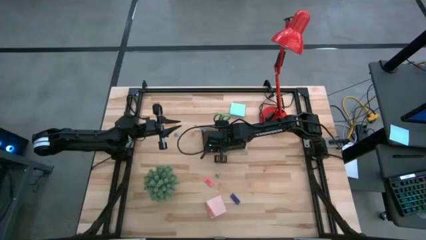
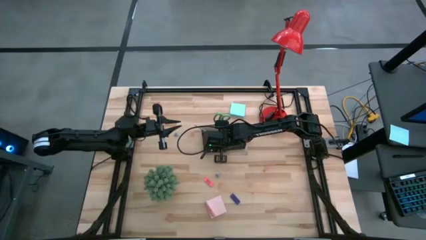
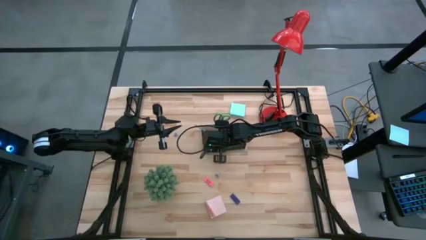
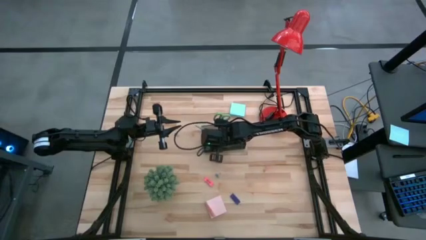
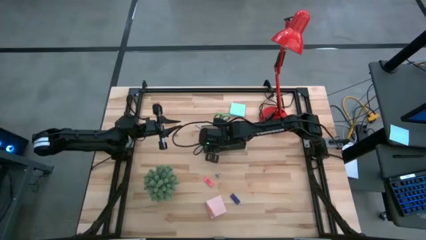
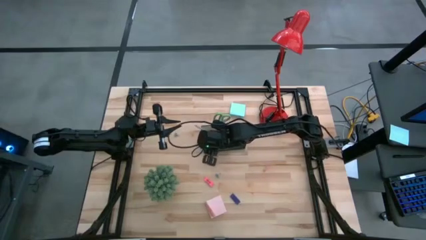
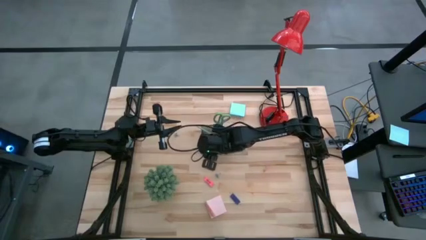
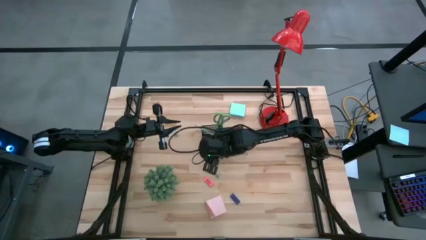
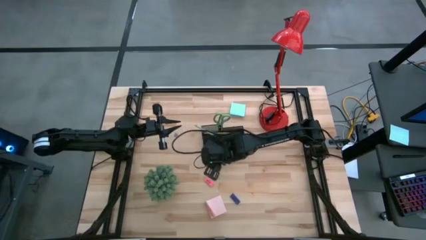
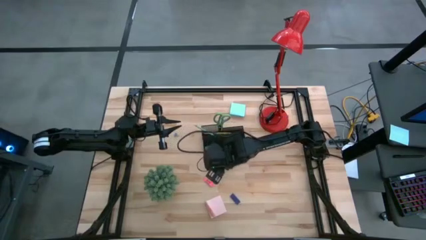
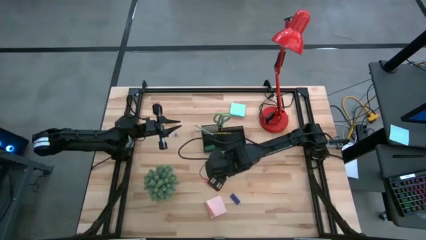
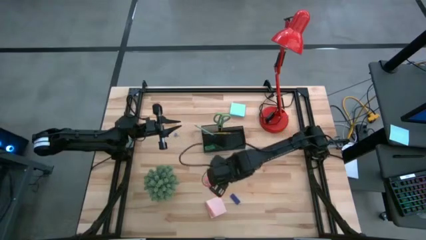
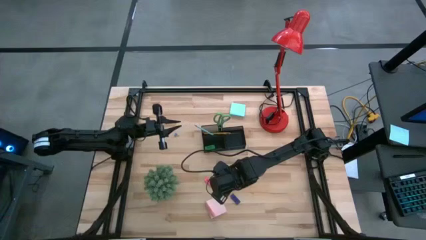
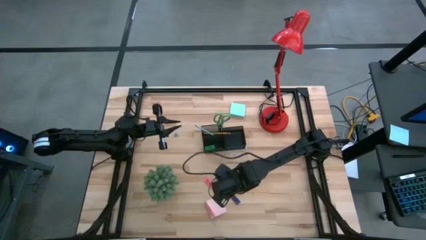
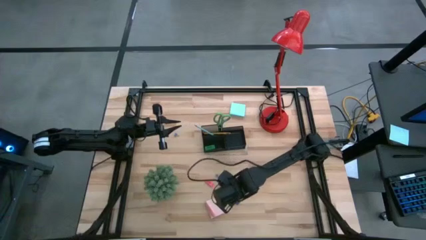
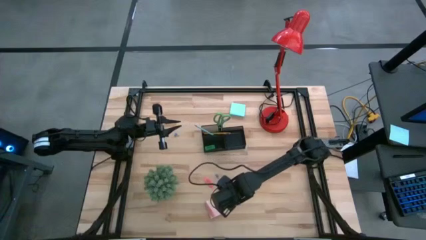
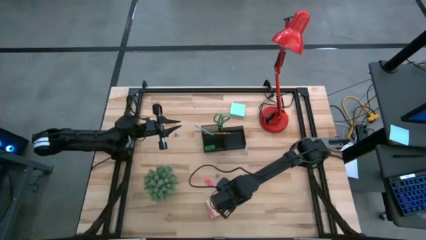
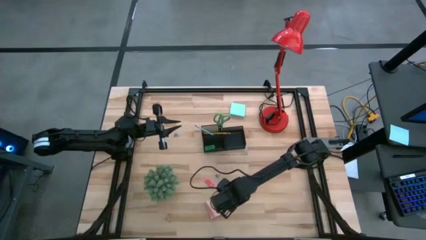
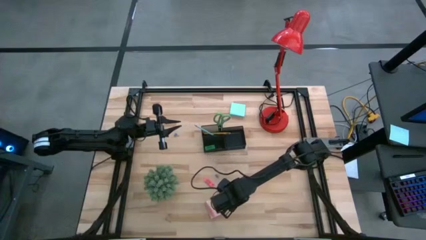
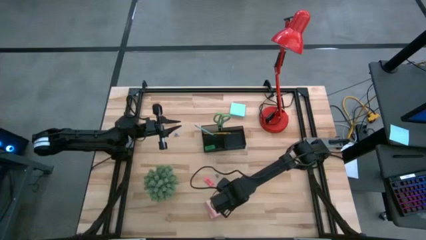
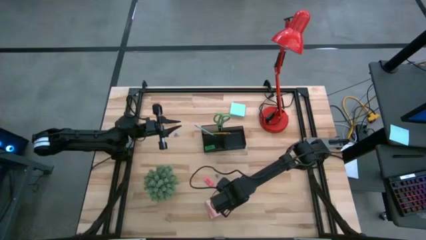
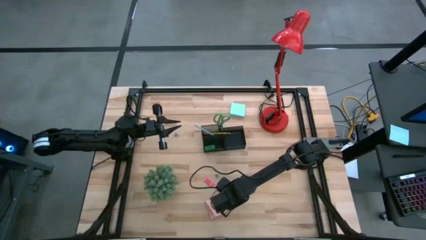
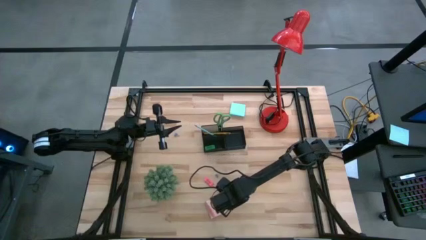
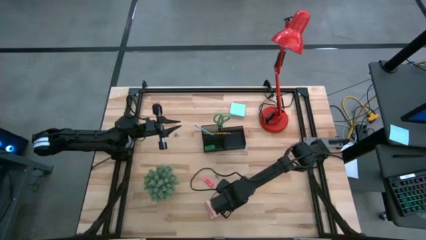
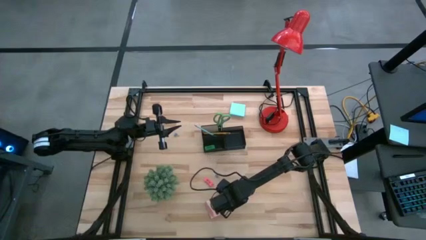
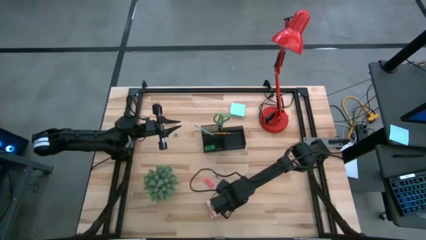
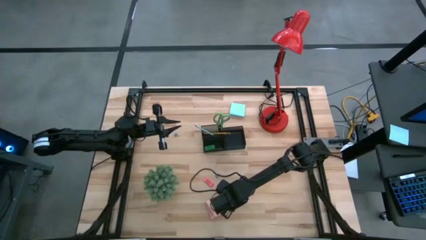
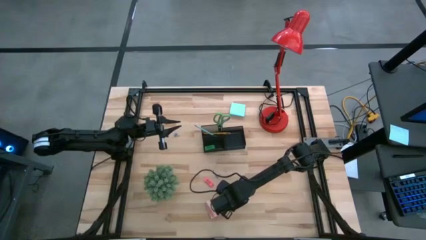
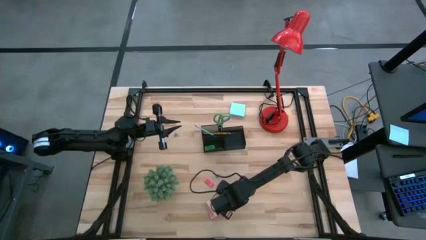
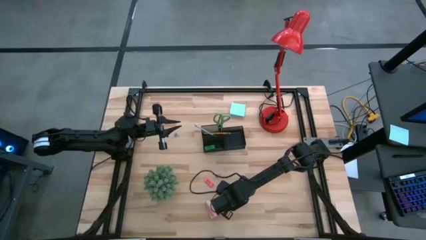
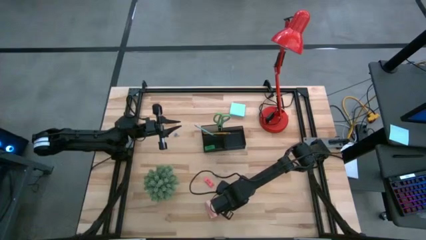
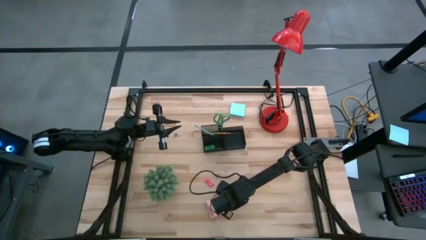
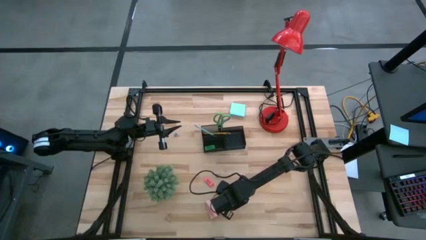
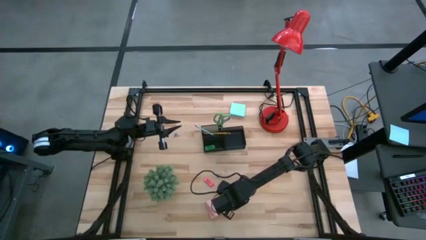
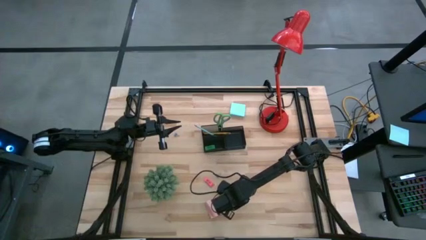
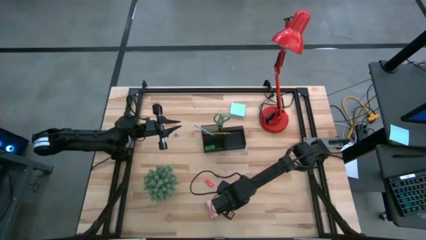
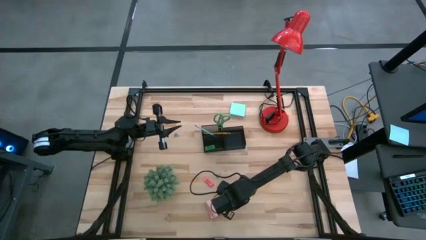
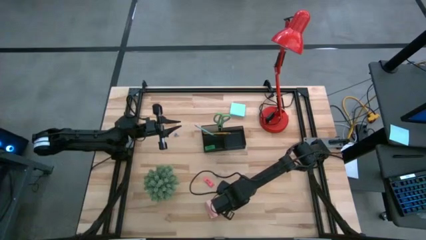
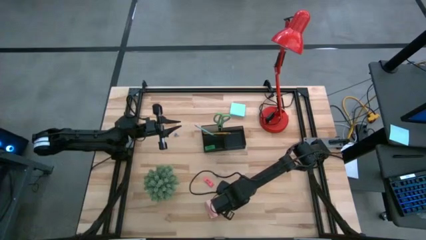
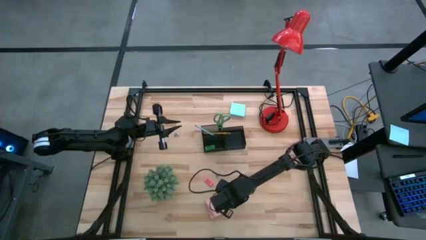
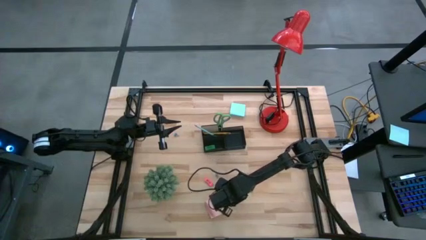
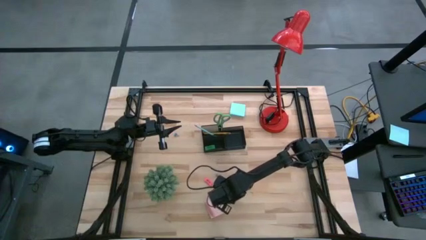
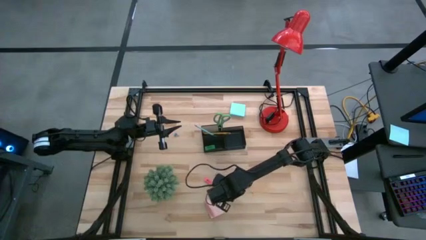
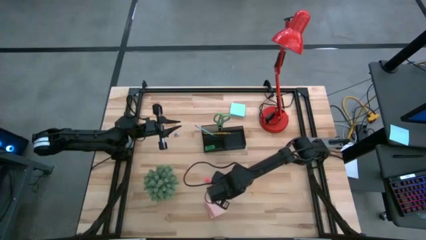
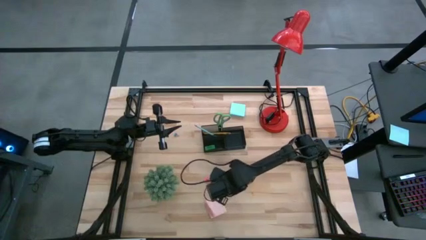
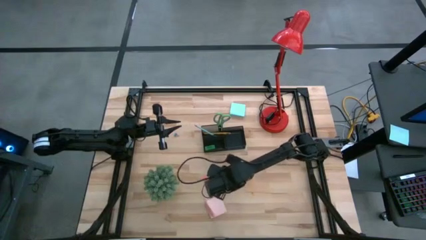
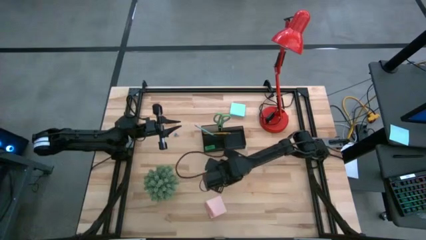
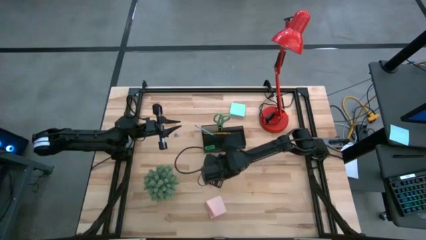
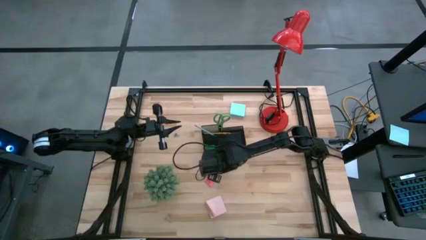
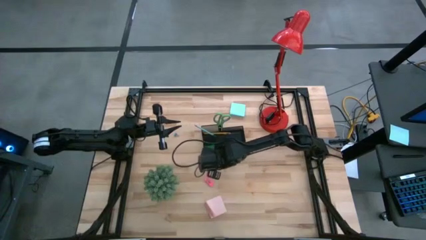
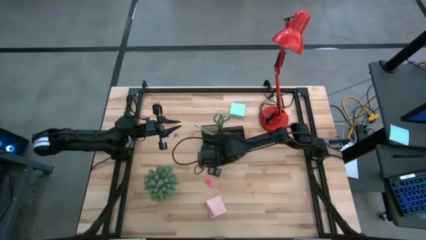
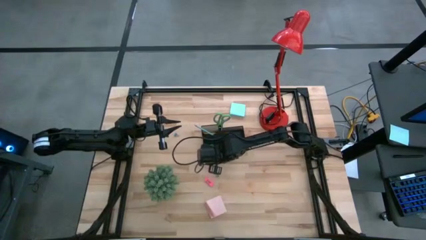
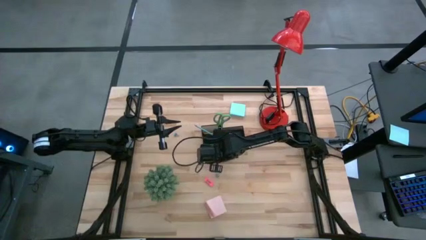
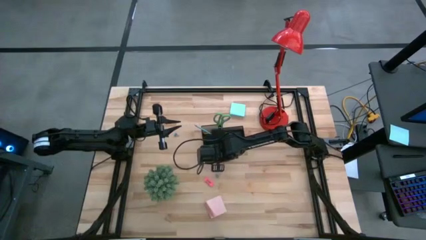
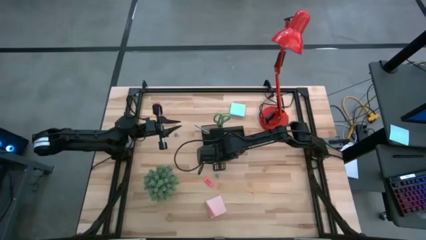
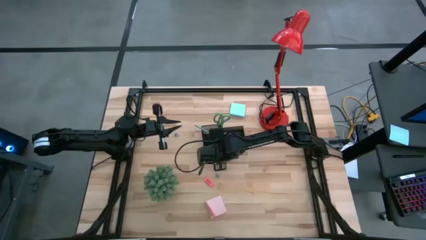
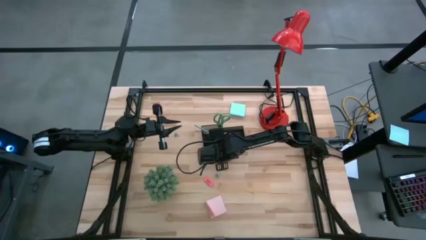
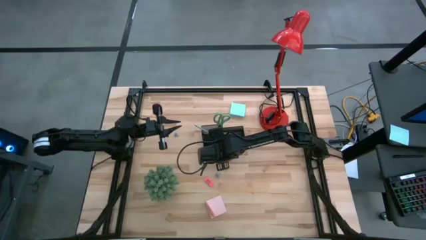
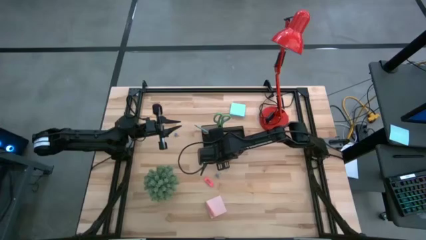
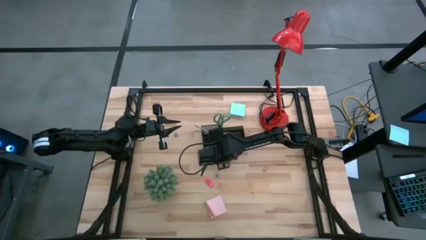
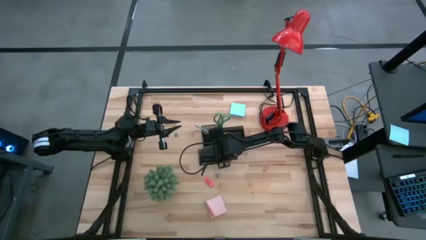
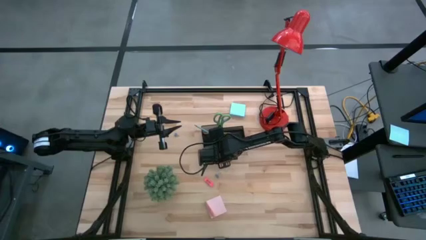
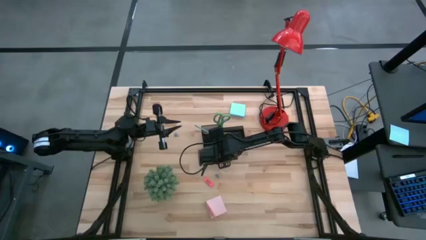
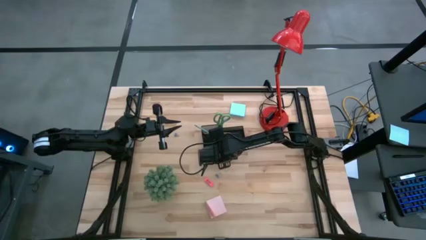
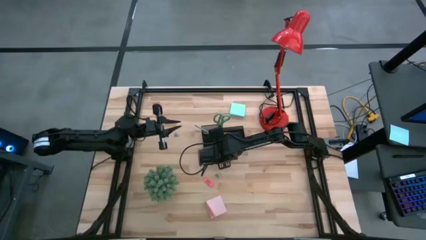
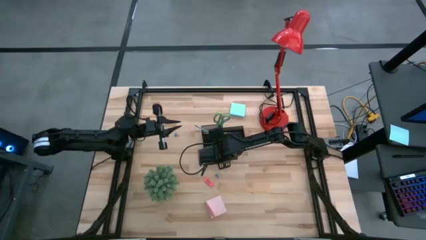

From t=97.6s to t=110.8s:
Task: Pick and place office supplies into organizer
Put the blue eraser into the black desk organizer

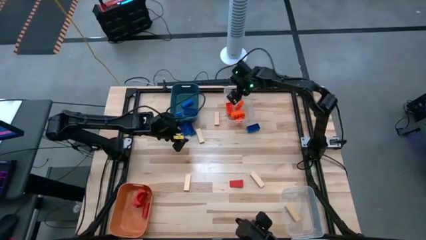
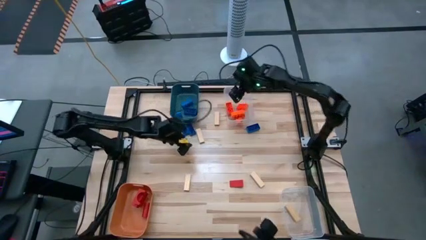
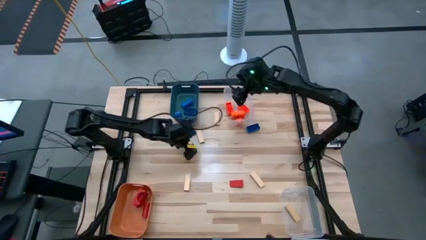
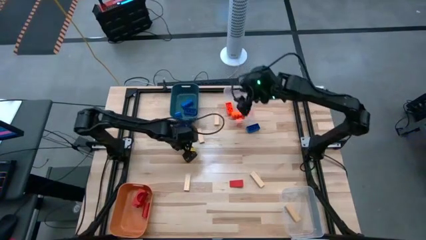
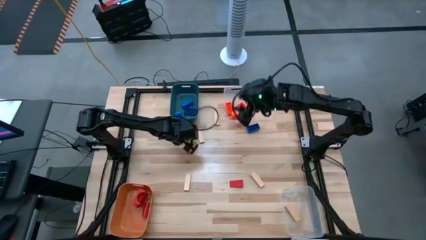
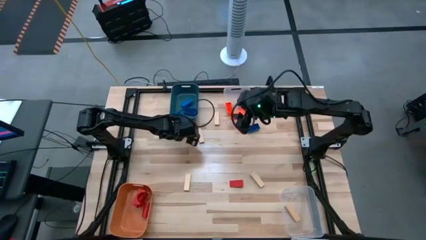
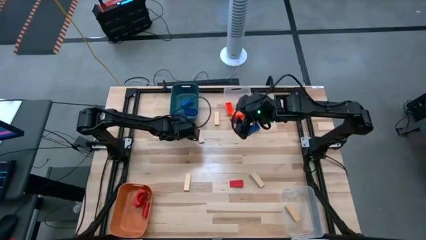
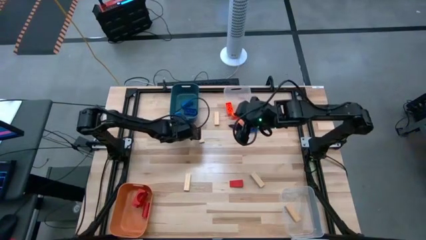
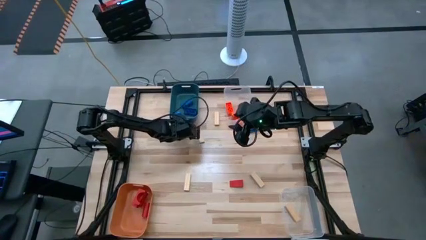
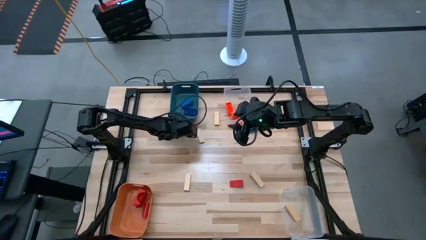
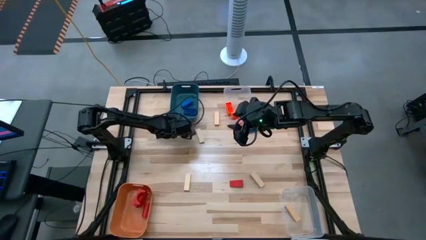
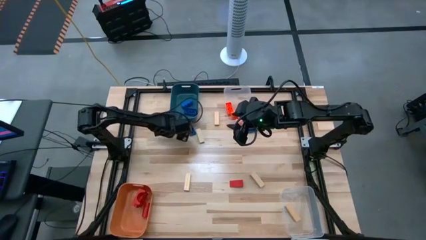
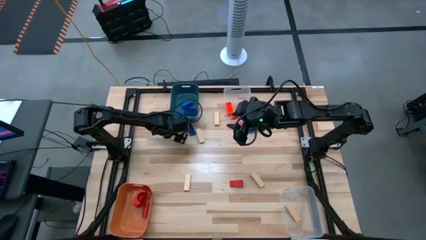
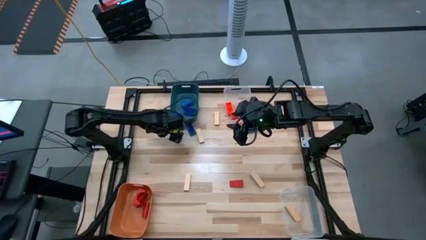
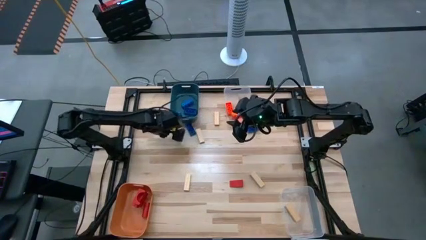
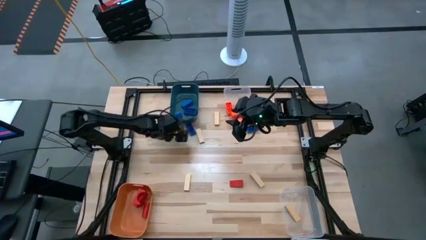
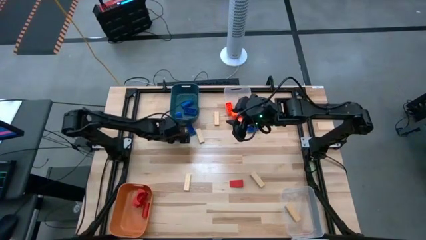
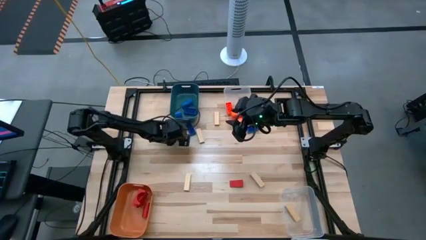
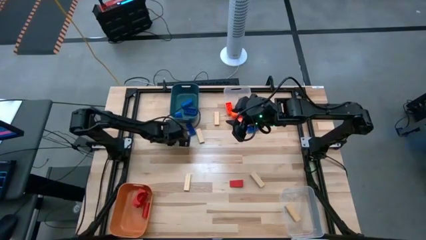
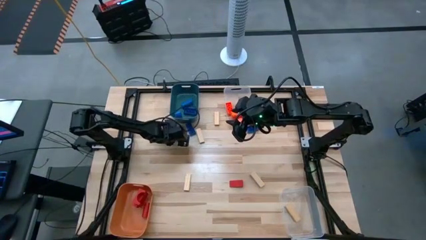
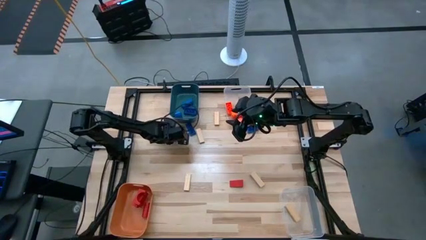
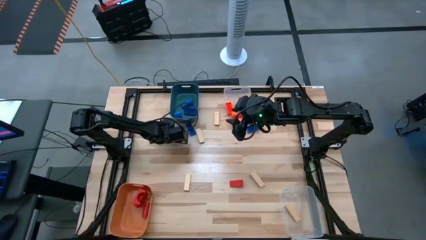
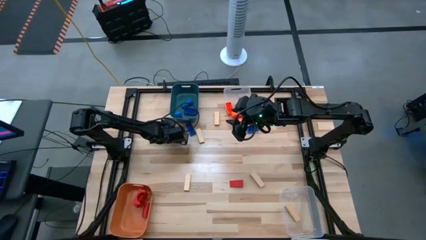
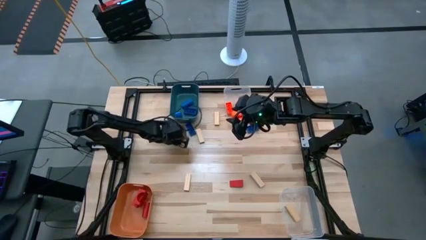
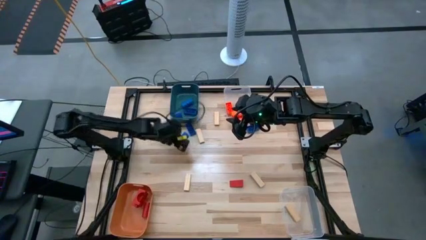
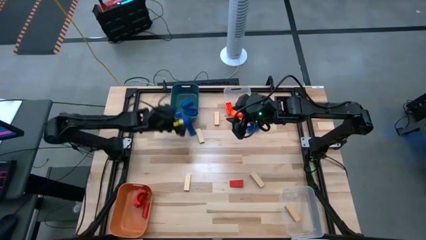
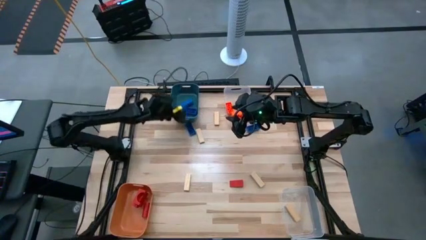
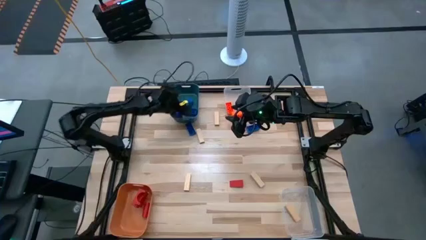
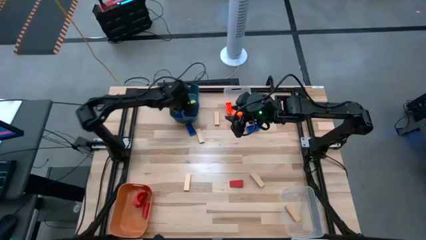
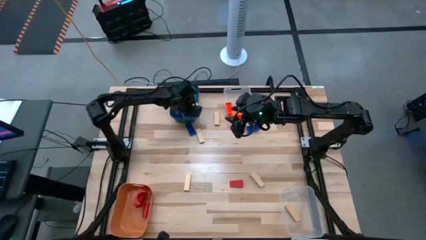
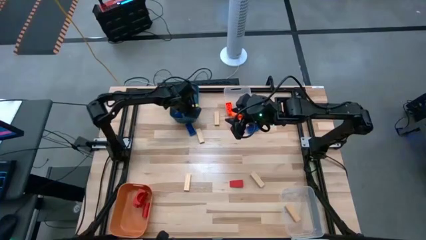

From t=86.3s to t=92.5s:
Task: Sort blocks
Put the blue game piece into the dark blue bin
